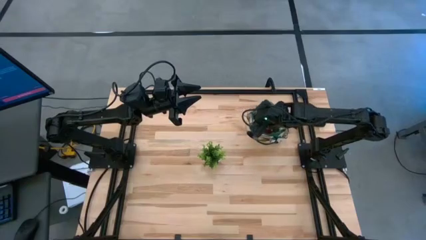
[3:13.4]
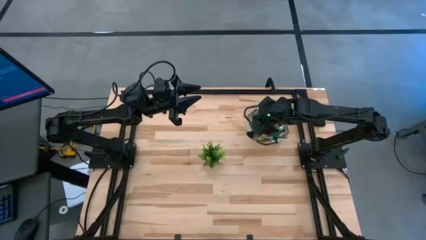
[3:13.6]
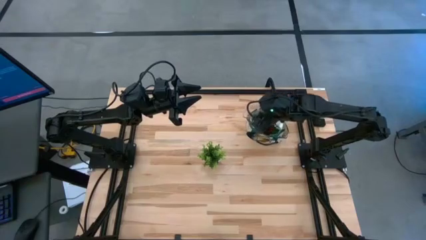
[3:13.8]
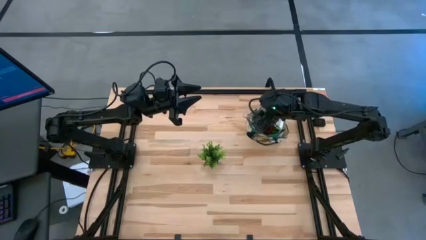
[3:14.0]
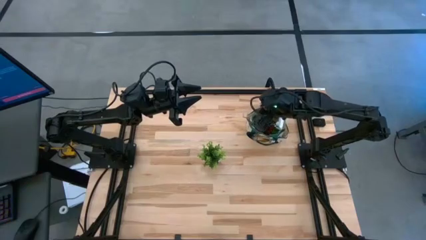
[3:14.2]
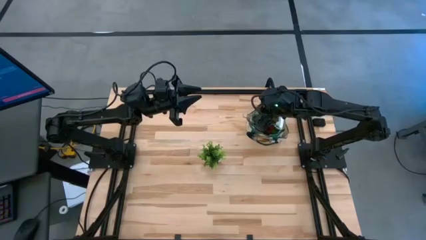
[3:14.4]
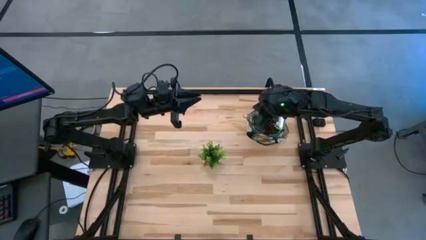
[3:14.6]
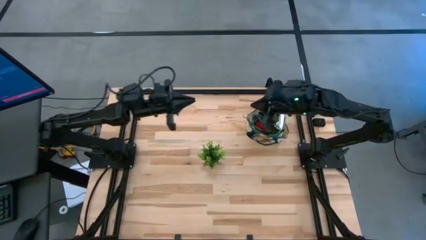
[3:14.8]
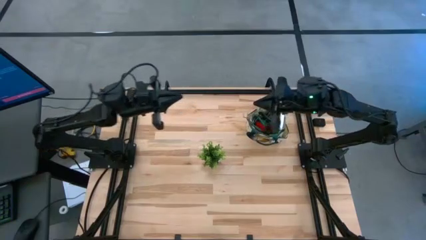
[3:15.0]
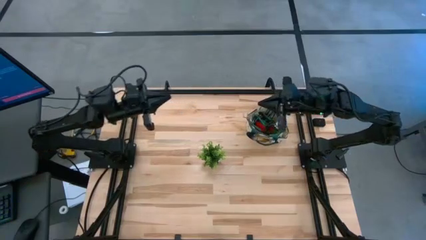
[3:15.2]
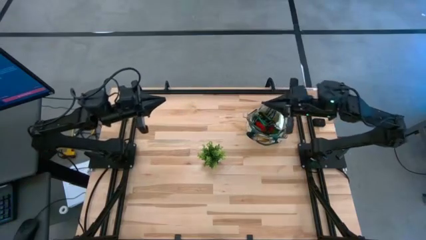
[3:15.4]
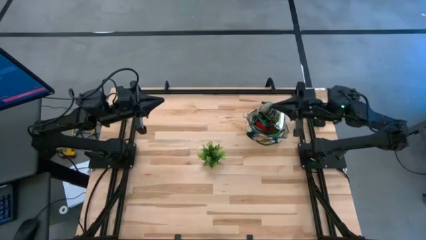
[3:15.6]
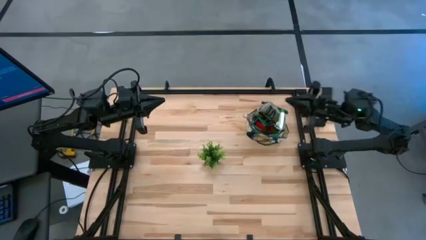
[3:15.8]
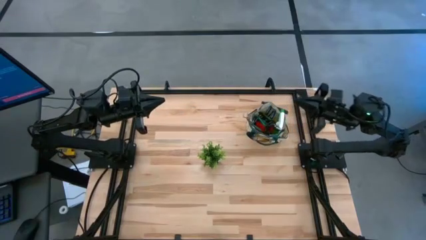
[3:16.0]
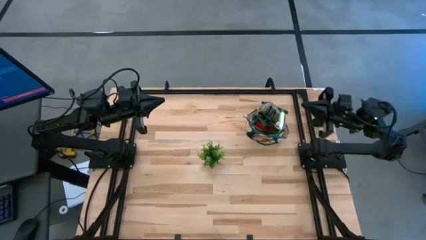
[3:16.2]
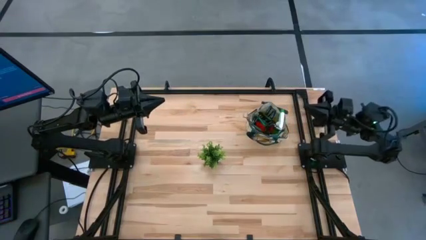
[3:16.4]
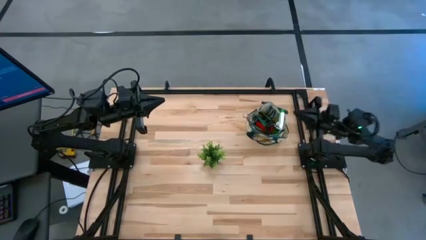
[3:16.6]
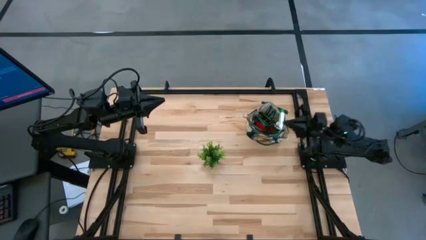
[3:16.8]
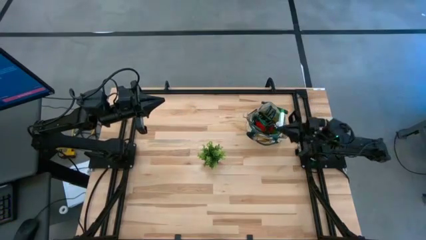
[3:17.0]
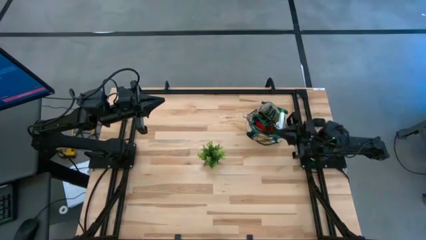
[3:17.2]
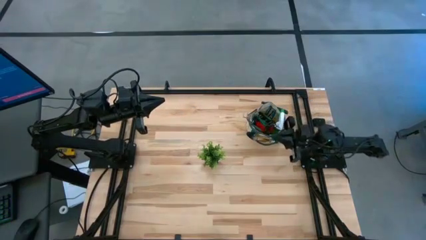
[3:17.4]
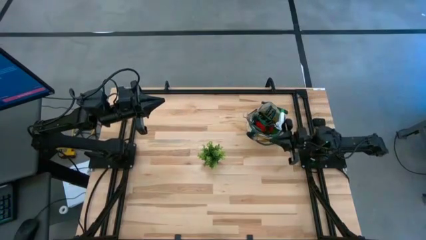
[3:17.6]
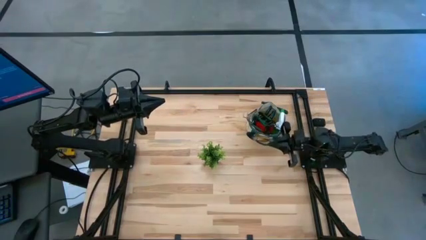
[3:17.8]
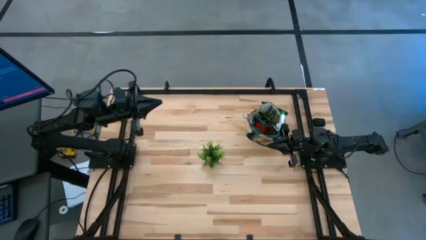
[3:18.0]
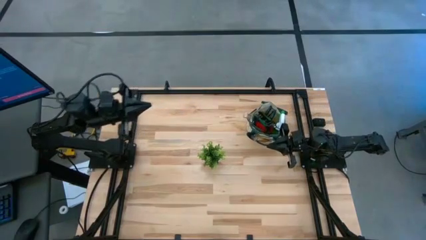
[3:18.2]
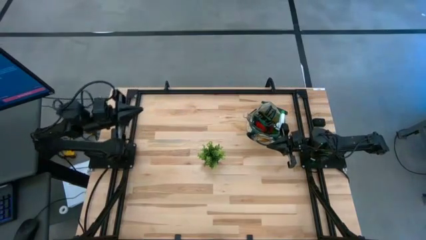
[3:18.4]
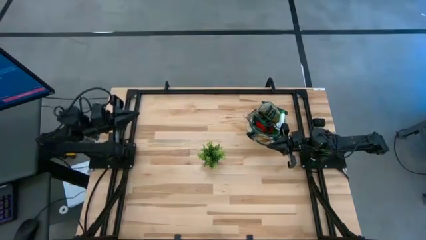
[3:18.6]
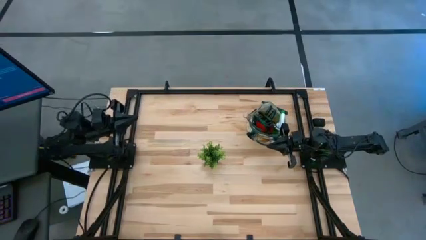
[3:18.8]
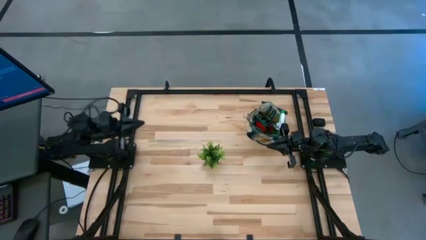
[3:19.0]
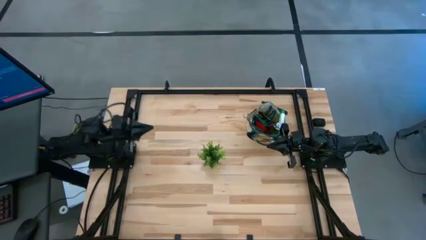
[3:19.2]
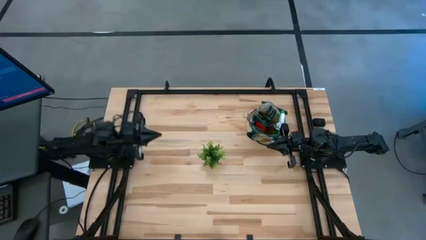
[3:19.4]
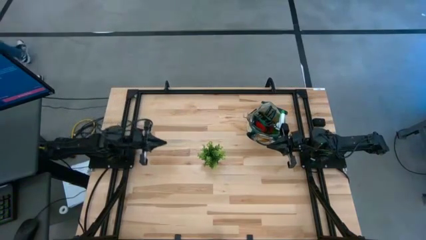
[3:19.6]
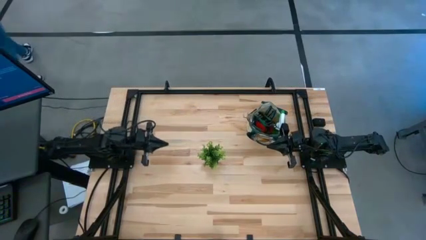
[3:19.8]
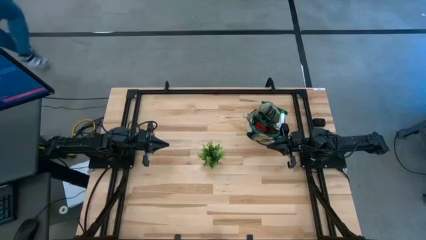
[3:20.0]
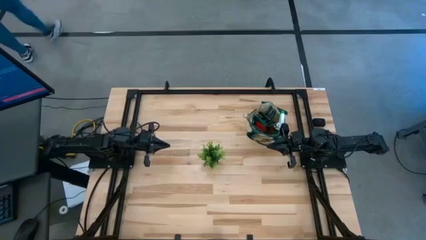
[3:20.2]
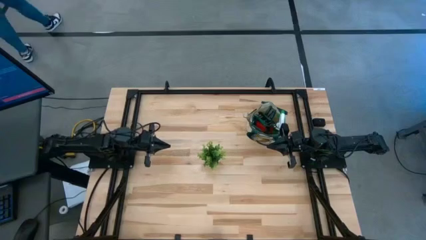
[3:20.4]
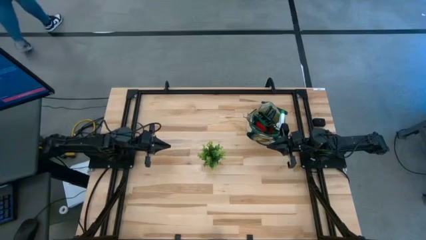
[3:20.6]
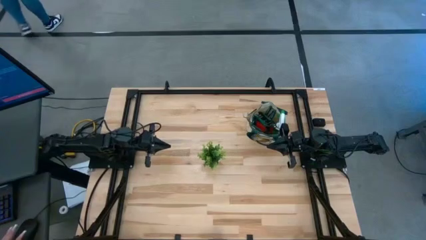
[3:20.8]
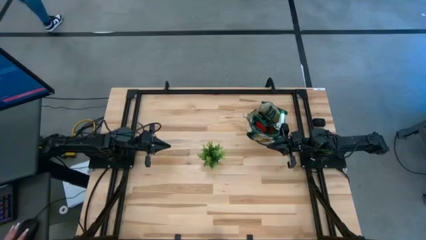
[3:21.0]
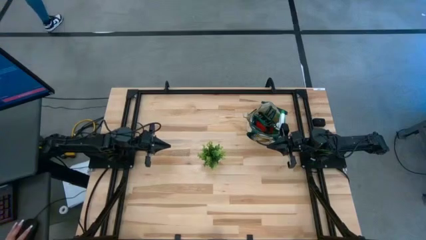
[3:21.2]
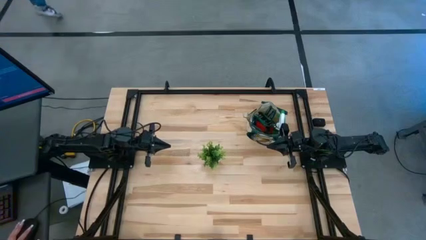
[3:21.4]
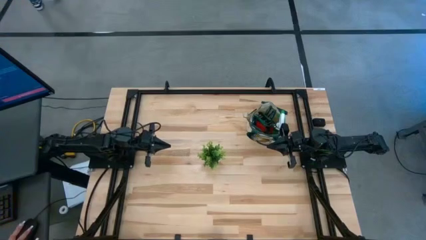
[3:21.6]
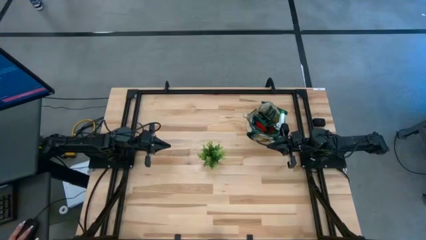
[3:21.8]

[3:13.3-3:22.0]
Task: Pick & Place Garden tools in Gardening bag
Return to Home Position

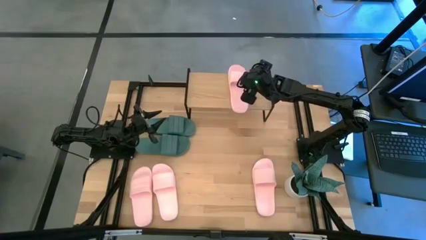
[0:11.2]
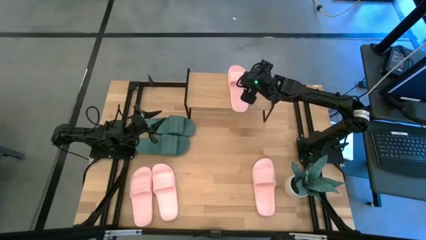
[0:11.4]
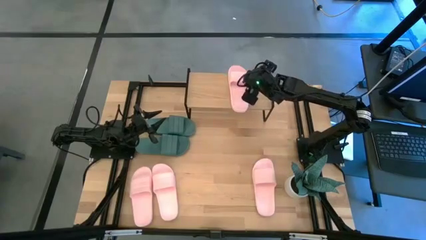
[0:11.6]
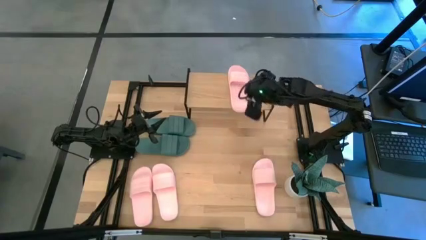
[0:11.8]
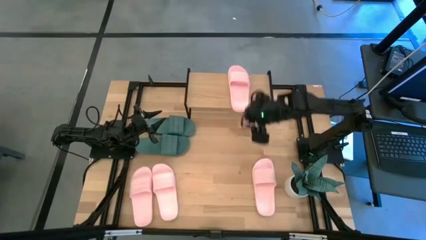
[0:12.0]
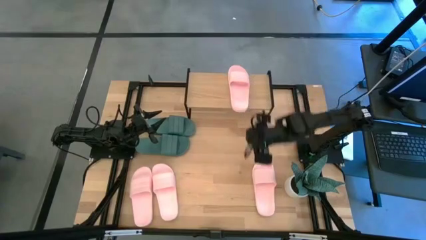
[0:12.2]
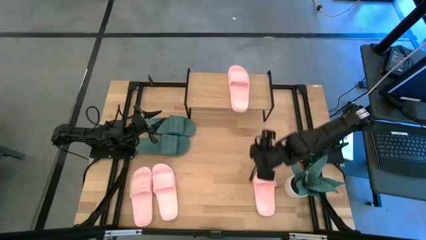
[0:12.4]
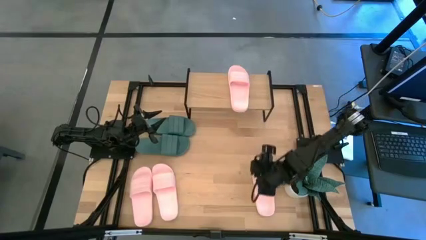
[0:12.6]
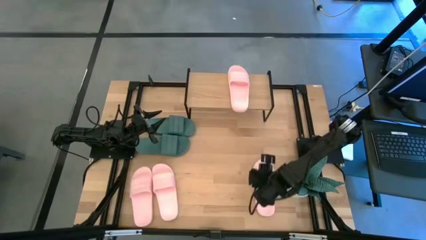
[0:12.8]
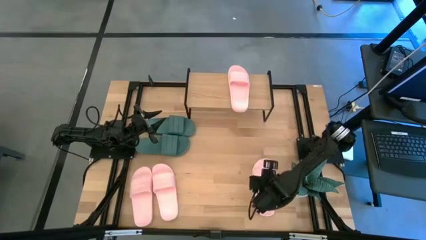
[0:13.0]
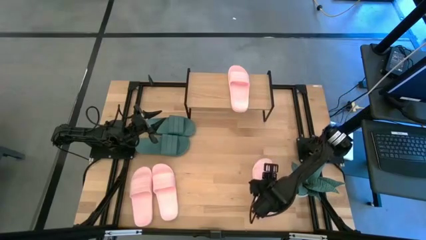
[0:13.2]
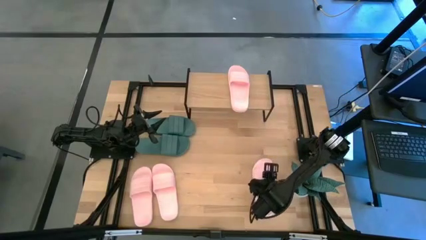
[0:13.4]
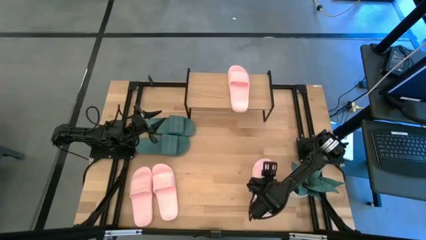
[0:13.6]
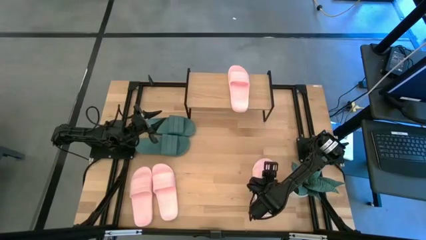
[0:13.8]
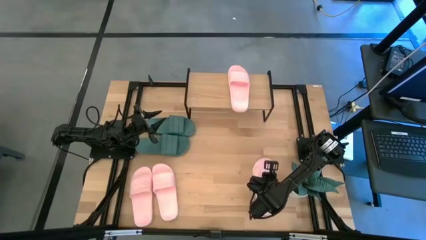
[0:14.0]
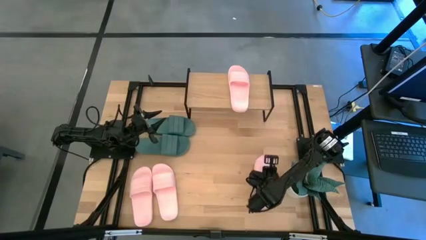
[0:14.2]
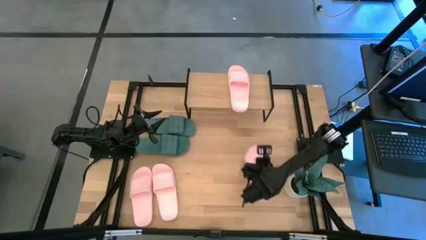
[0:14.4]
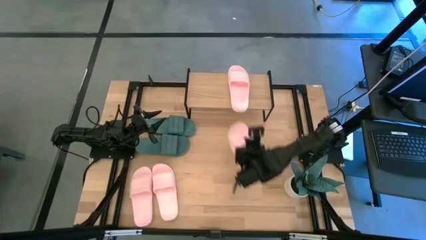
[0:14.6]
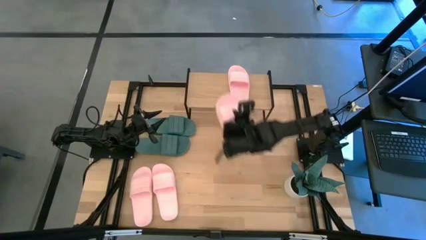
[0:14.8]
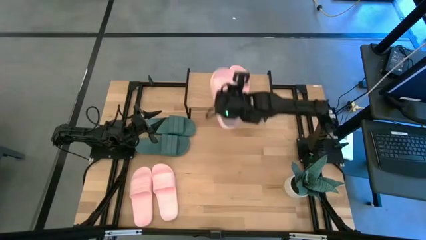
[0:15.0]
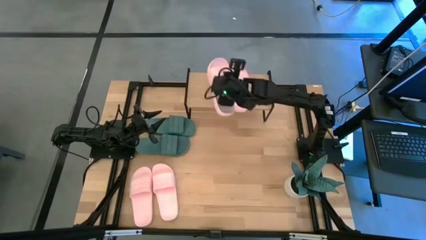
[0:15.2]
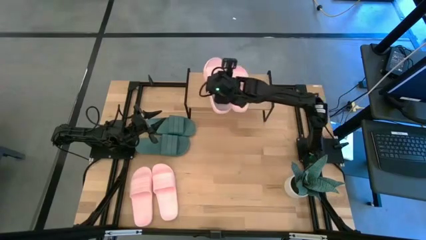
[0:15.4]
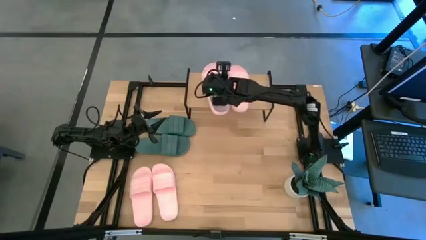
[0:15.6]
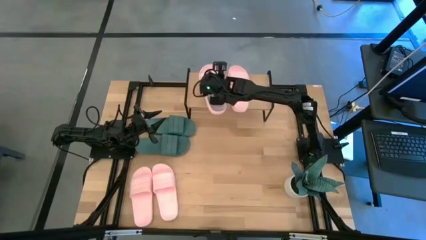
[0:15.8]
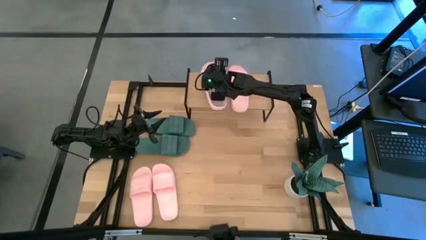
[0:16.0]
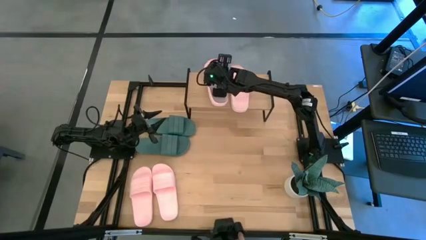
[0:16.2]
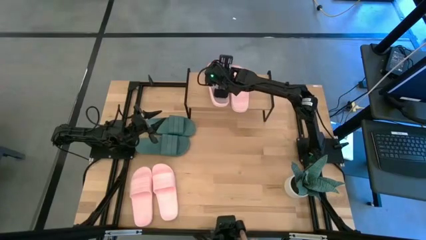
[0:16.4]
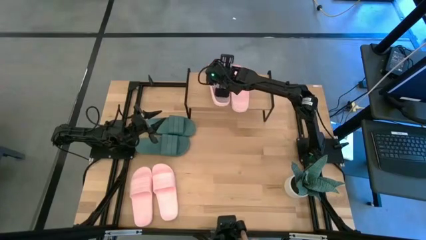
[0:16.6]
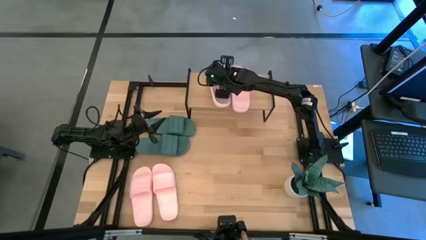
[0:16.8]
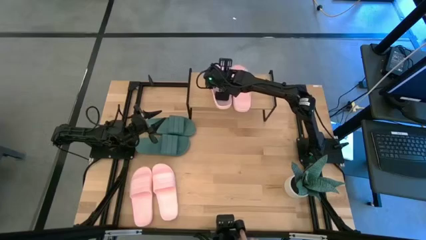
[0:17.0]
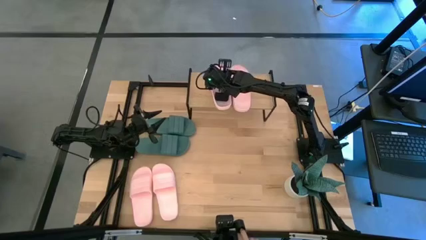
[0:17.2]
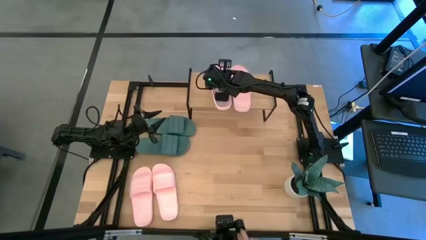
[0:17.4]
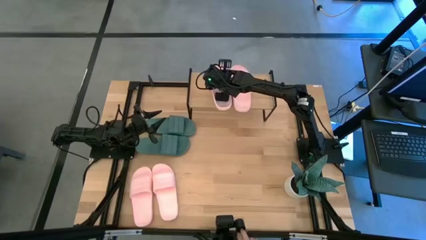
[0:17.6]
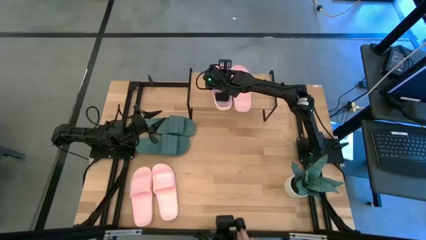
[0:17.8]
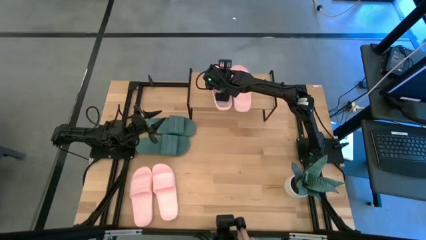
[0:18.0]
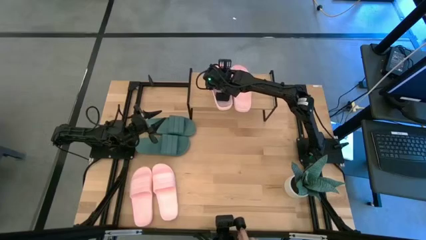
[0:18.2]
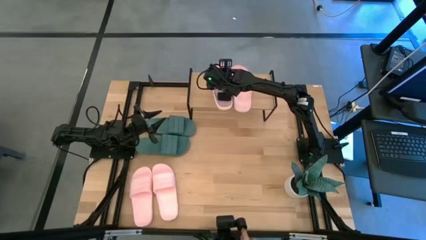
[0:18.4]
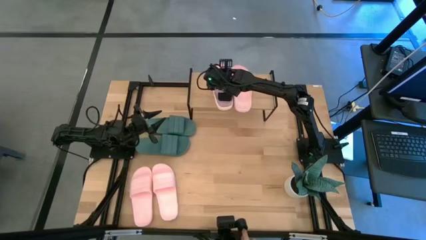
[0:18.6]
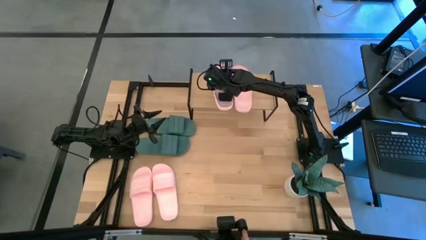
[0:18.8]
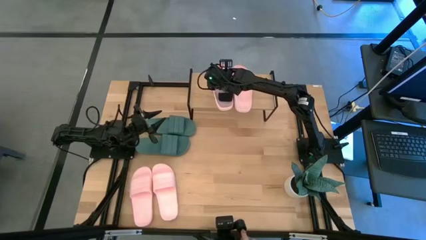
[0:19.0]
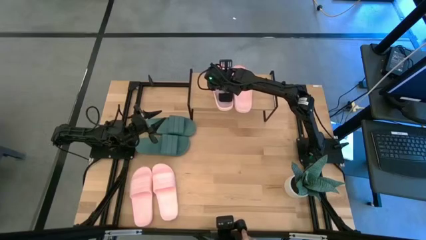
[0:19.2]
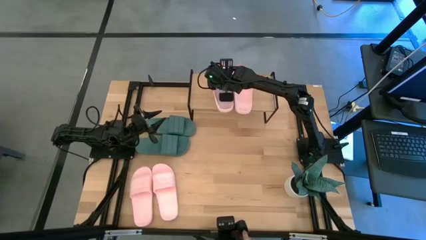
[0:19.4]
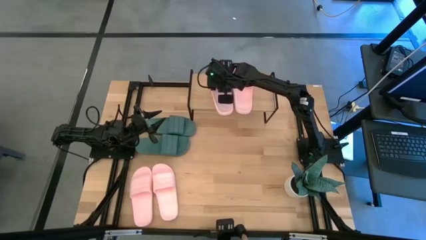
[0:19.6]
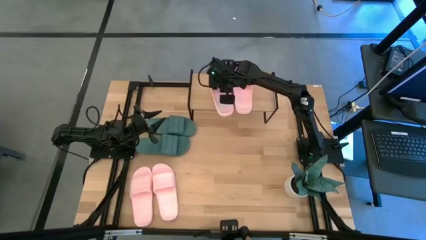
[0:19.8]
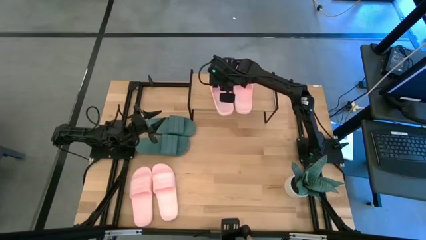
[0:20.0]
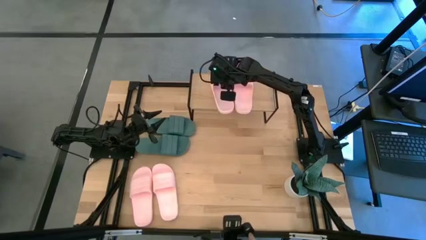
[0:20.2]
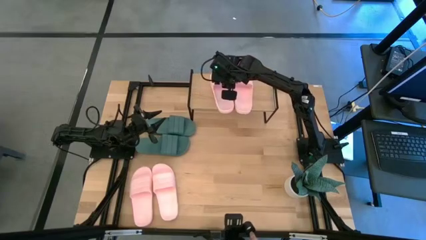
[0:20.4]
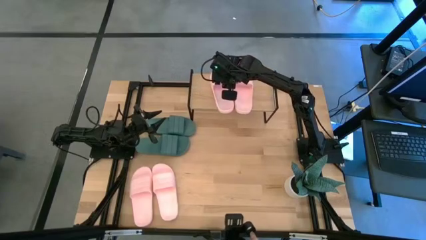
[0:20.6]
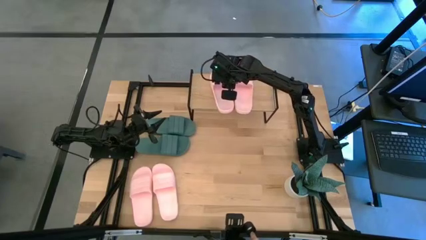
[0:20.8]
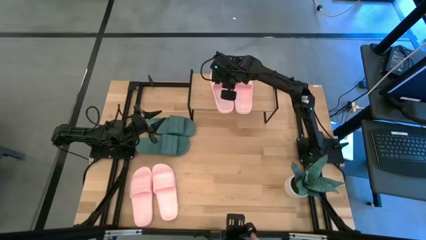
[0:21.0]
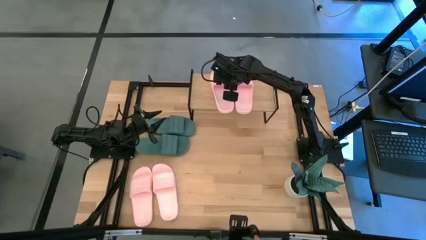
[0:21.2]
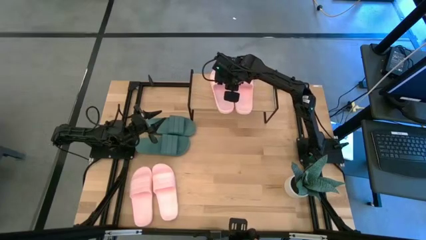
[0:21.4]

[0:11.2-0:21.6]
Task: Pick and place slides into the shelf
Put the pink slipper on the shelf
